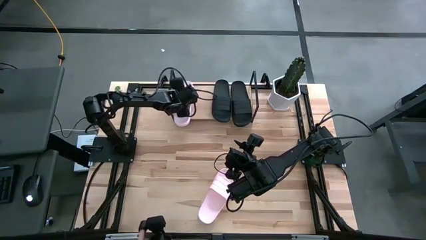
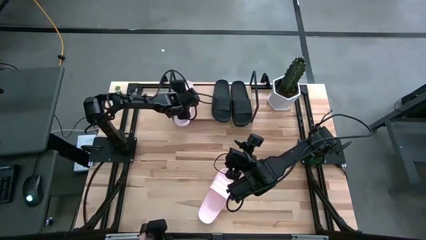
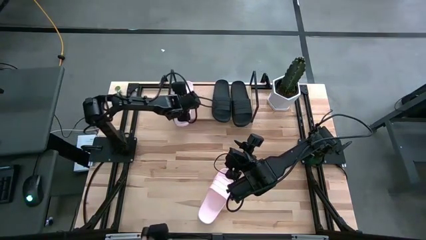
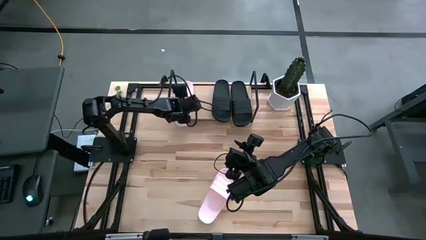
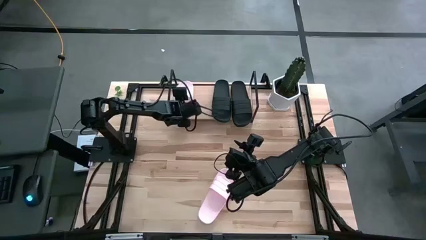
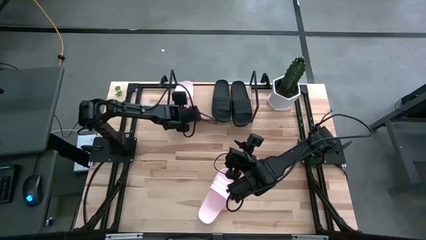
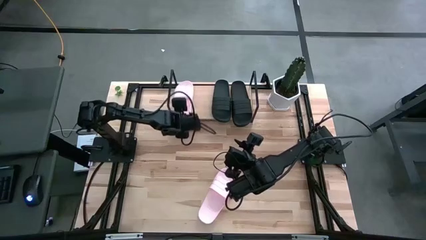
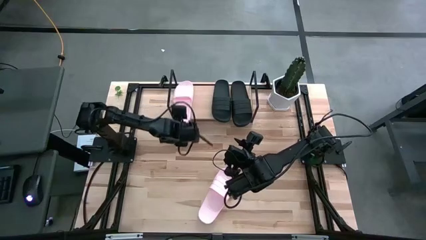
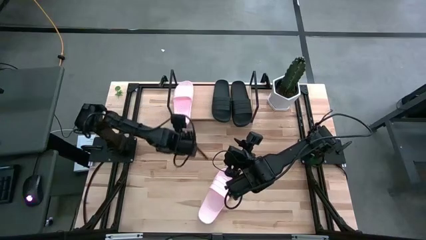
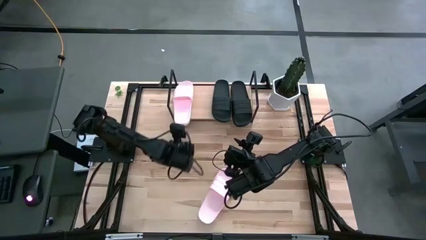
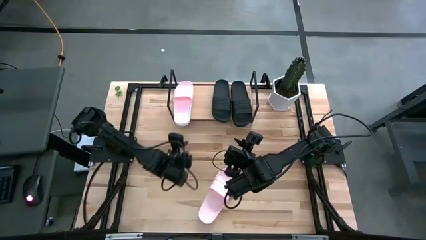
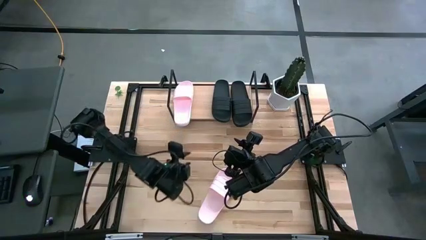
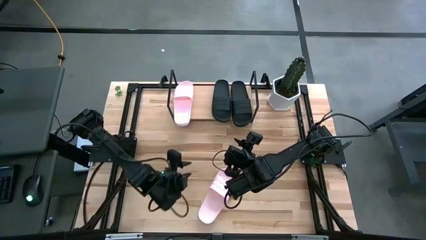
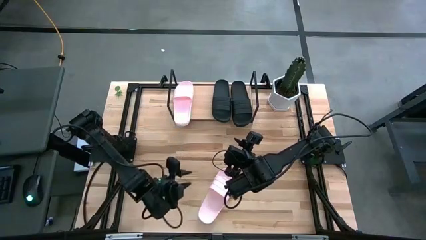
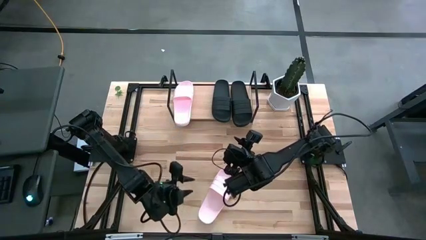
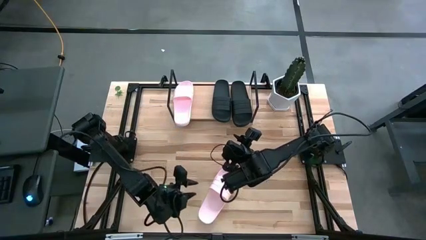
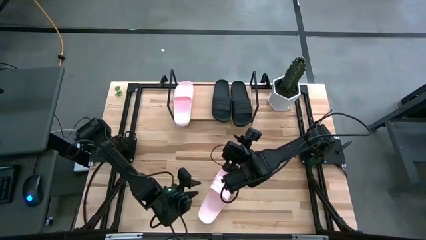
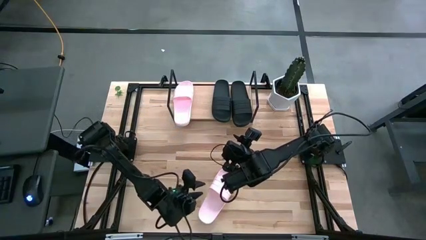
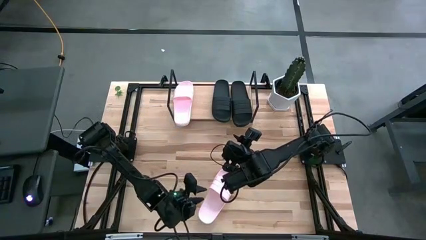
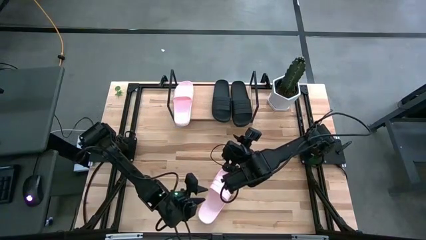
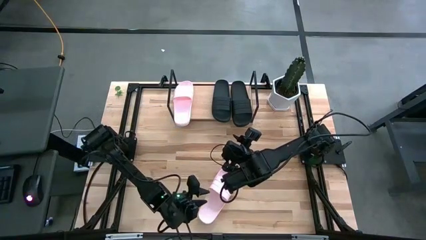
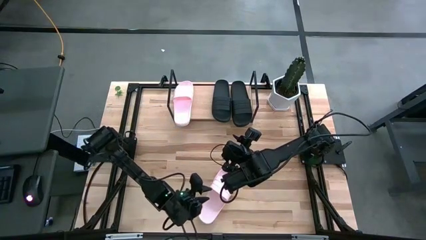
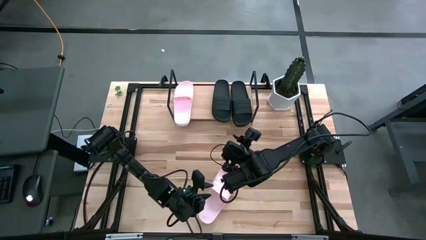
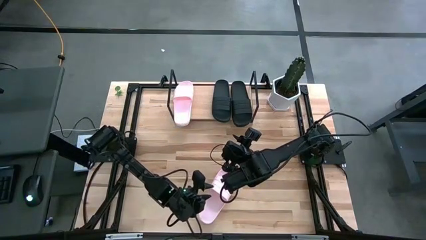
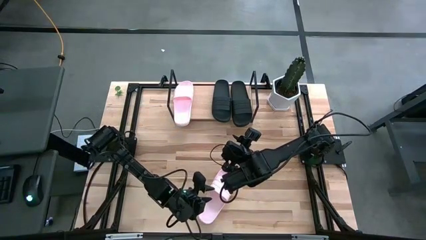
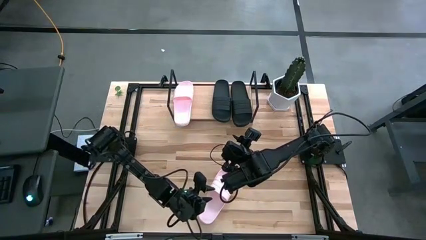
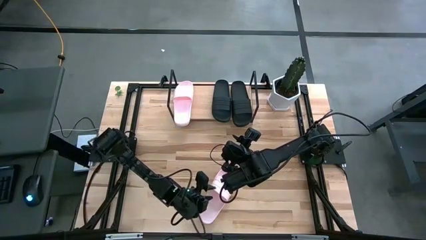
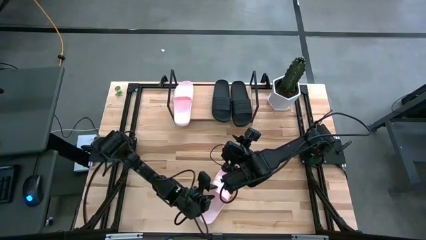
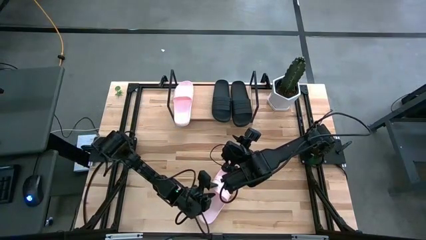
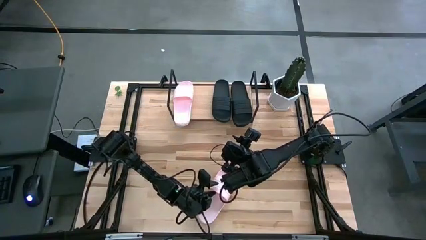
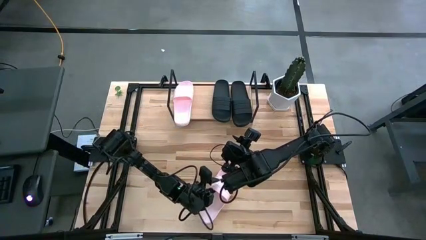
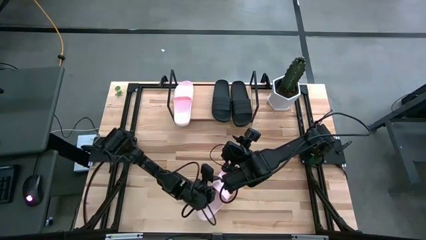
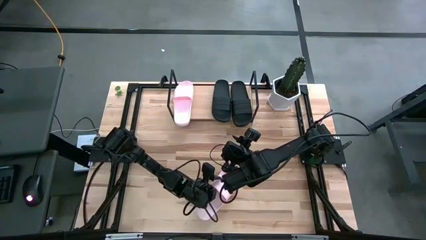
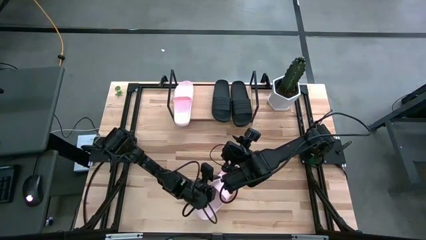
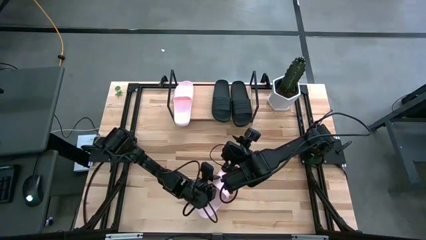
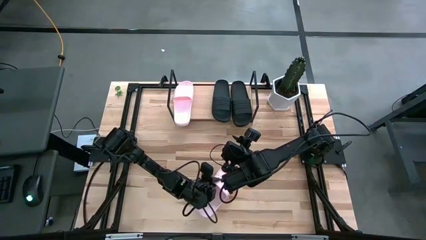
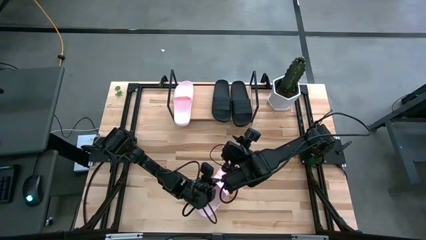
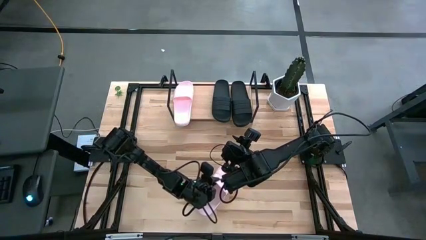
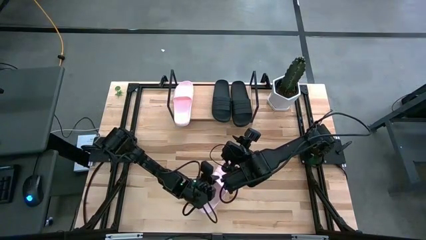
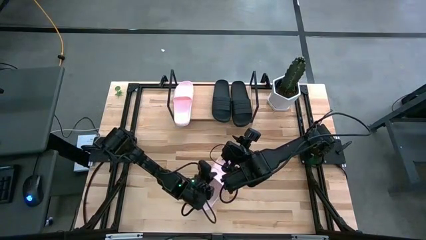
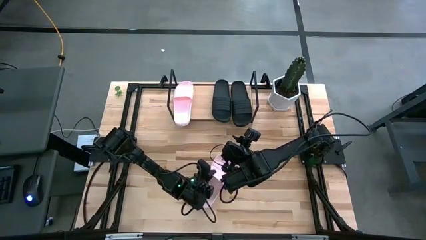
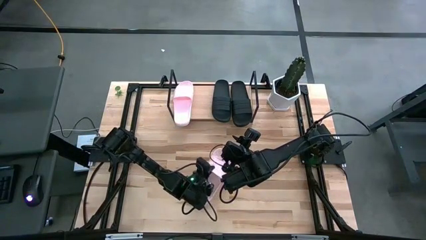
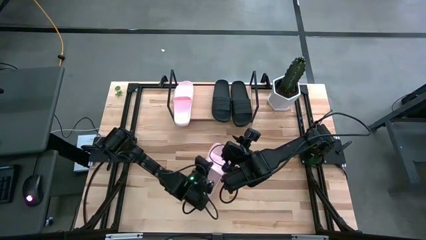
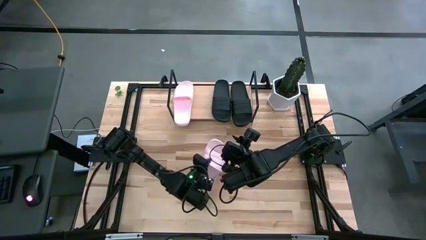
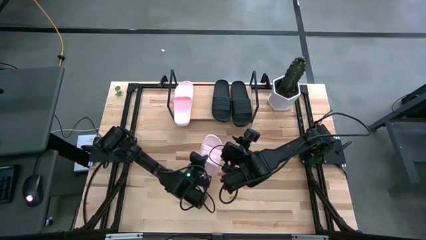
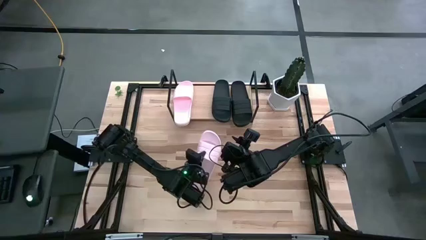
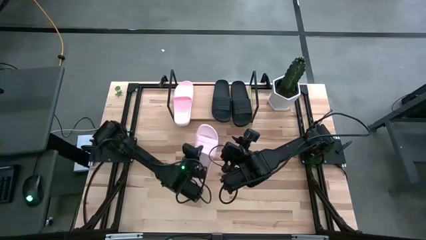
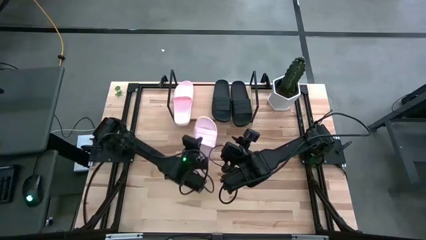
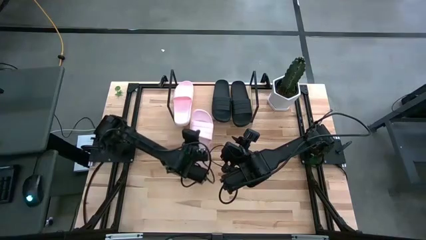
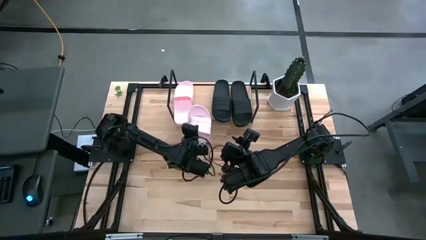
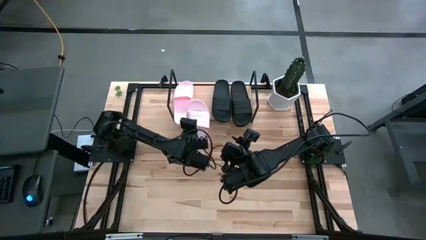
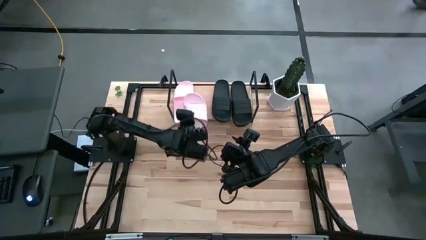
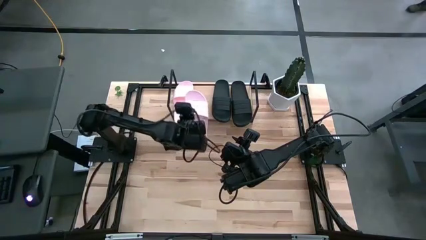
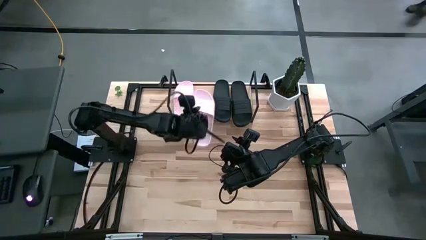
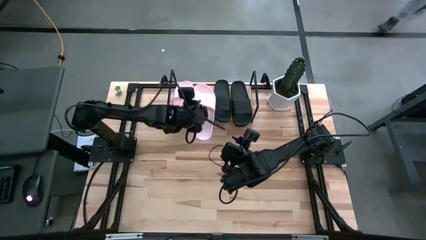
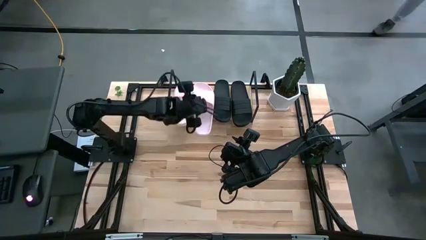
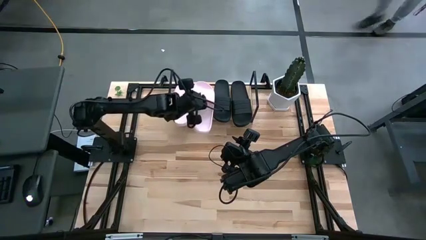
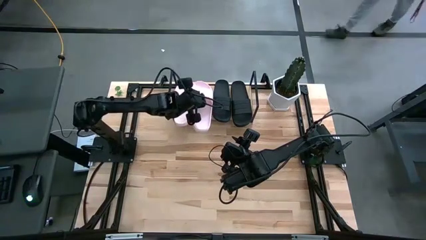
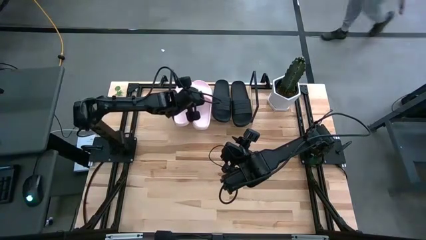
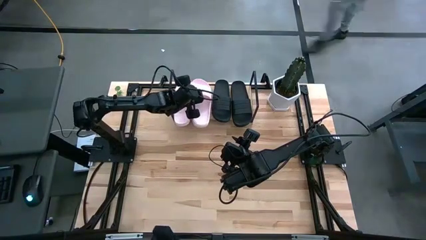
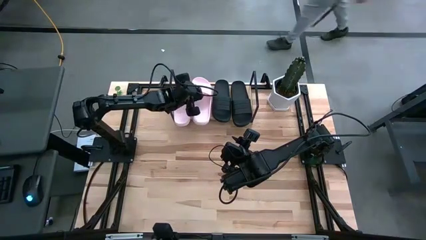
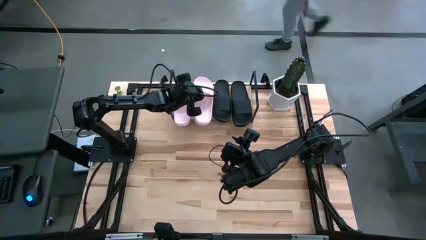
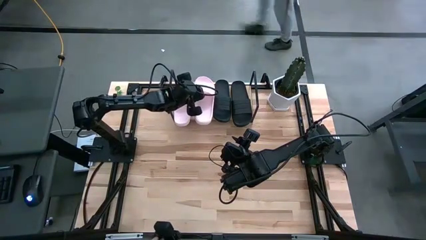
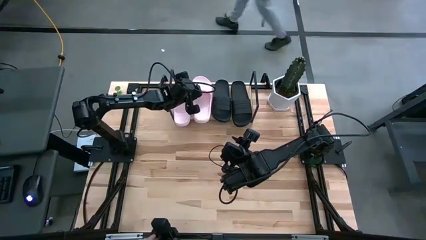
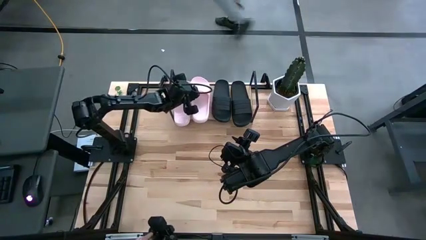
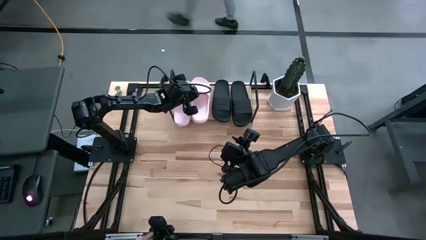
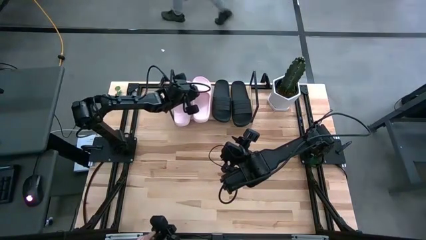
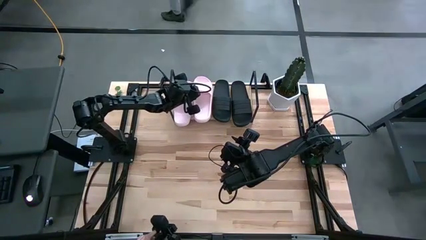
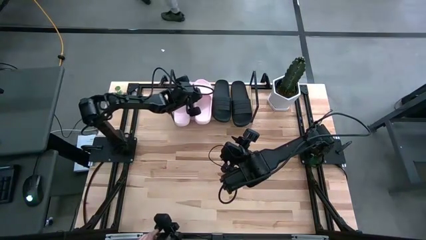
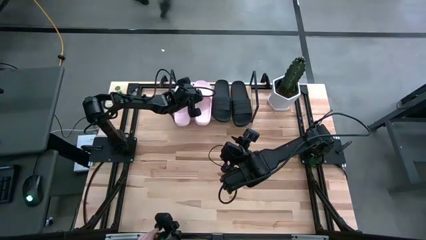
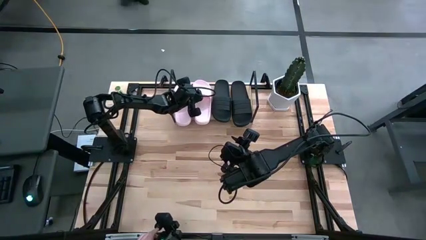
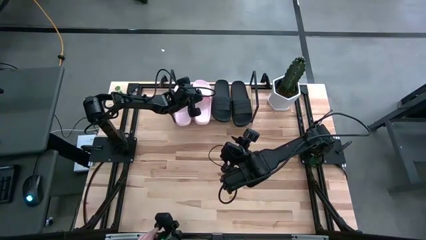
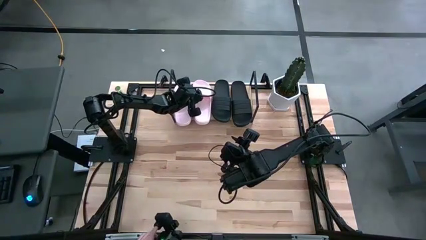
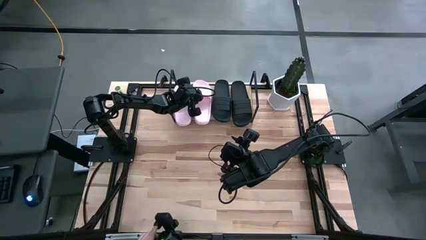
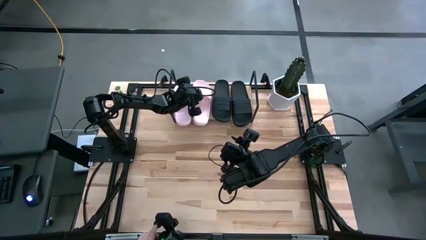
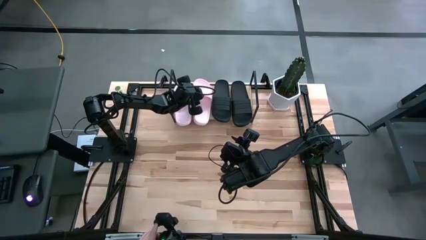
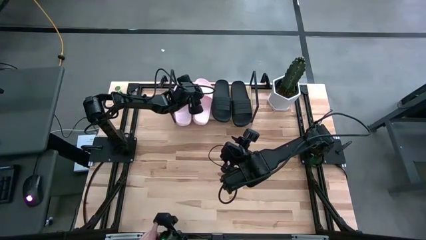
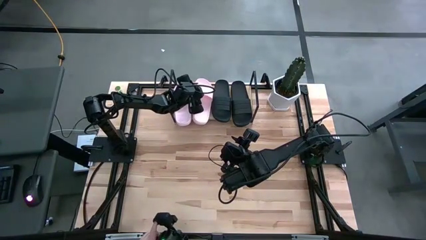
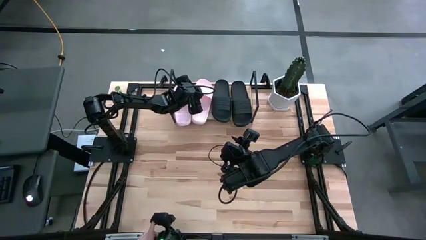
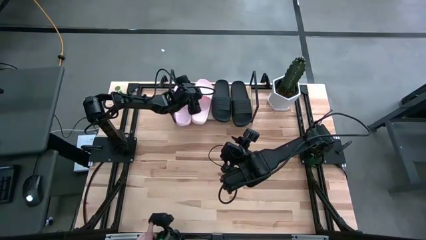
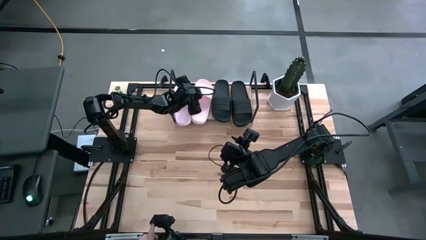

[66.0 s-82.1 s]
Task: Pick and place slides into the shelf
Put the pink slides on the shelf
